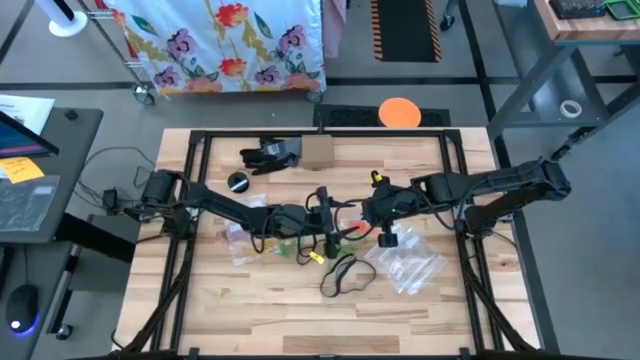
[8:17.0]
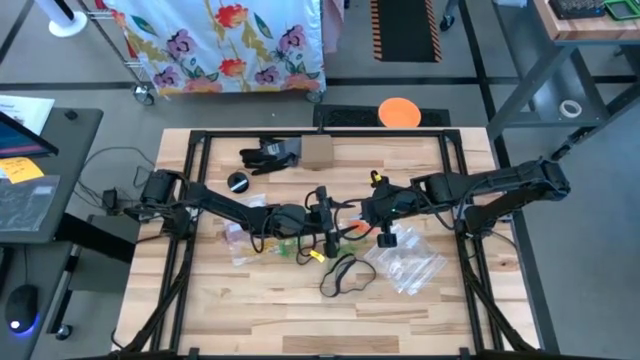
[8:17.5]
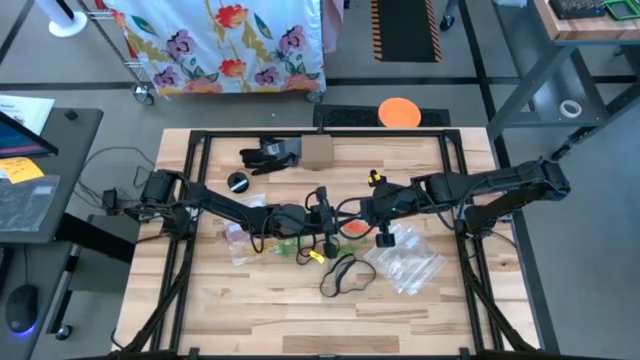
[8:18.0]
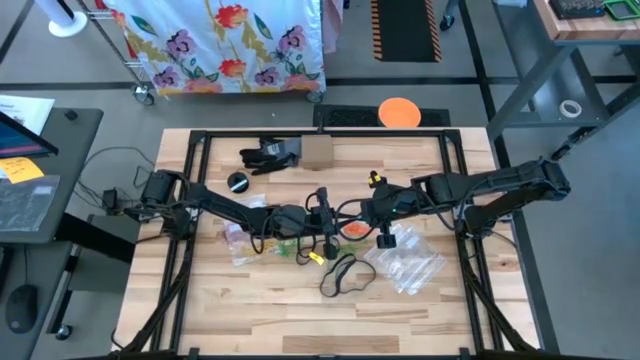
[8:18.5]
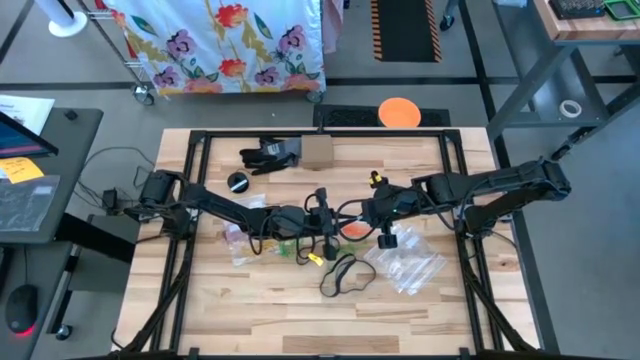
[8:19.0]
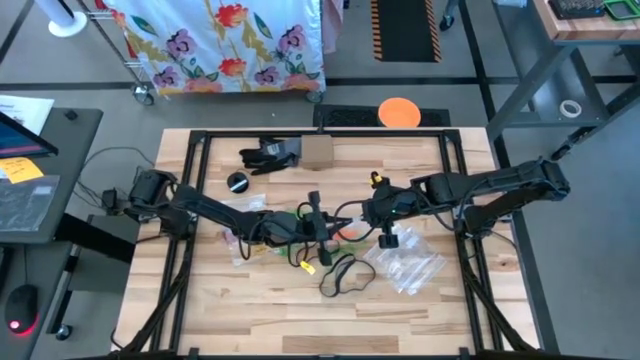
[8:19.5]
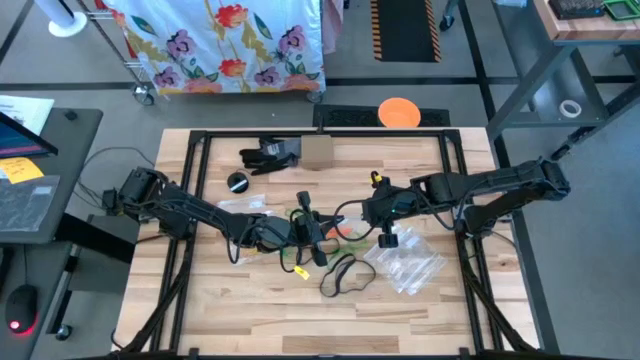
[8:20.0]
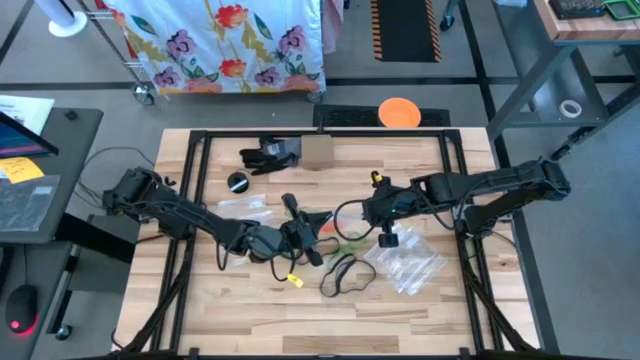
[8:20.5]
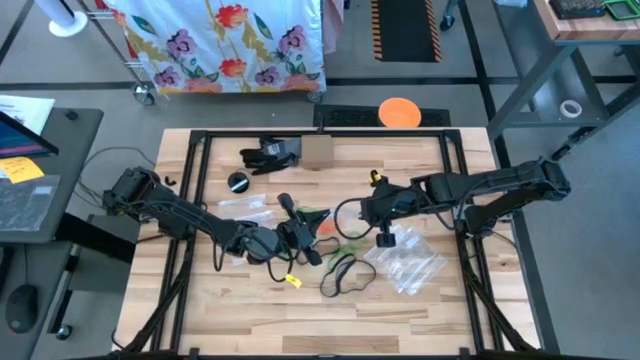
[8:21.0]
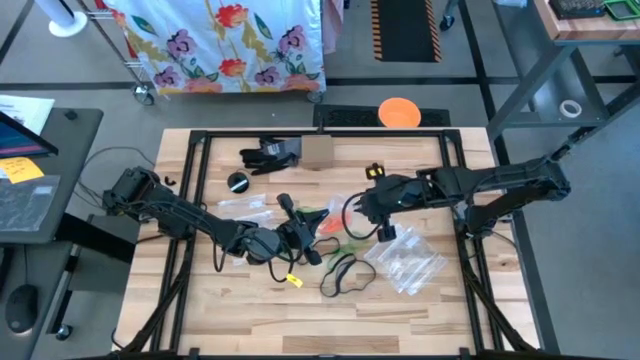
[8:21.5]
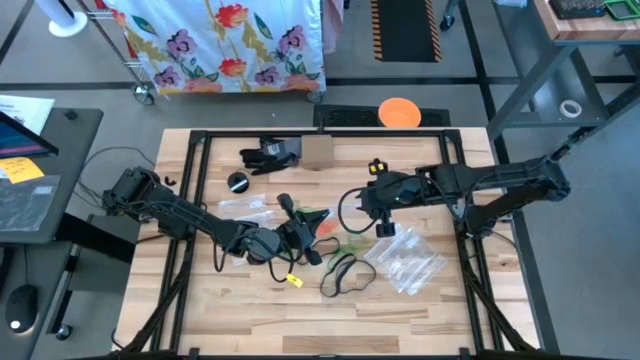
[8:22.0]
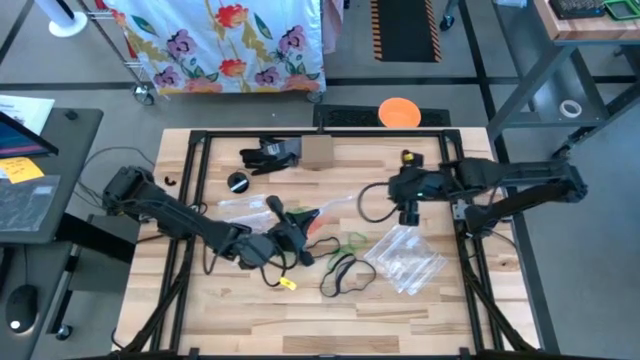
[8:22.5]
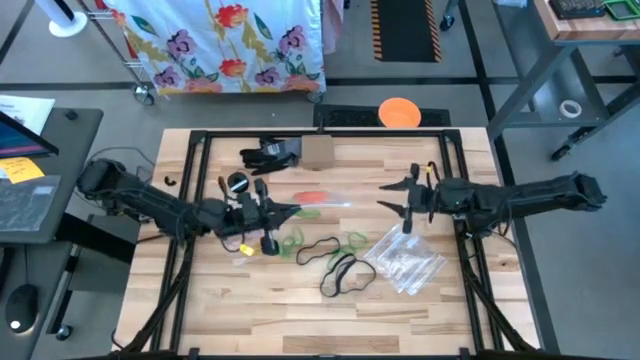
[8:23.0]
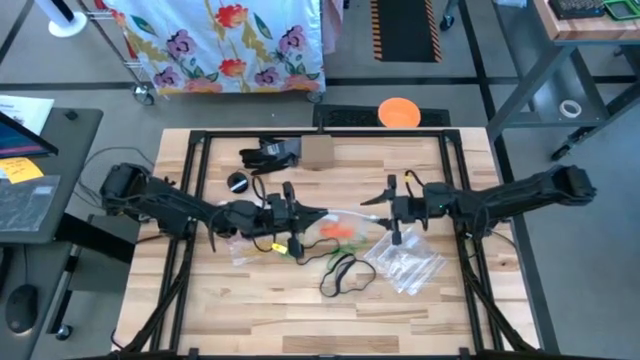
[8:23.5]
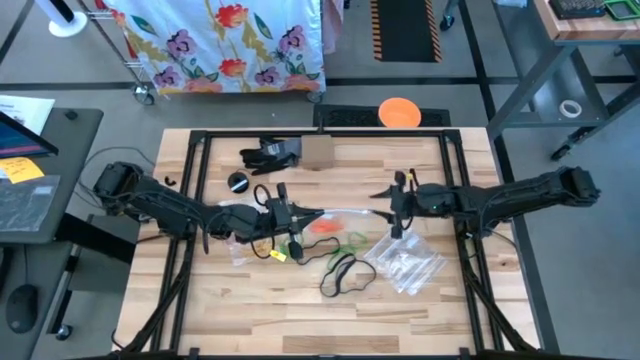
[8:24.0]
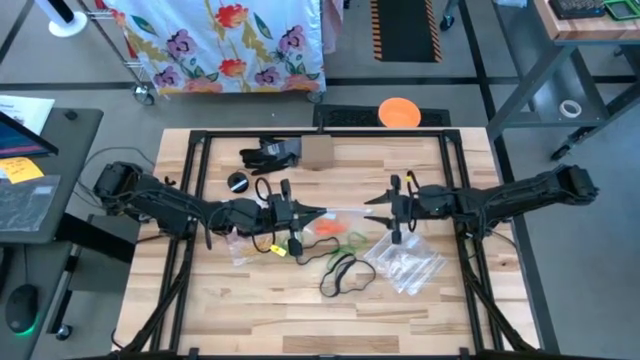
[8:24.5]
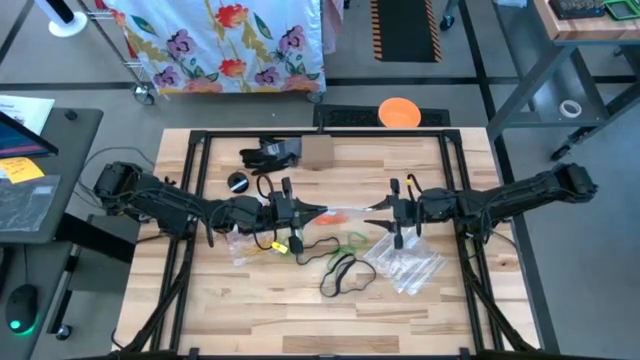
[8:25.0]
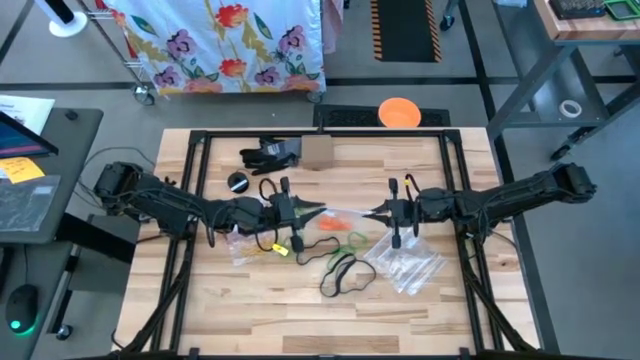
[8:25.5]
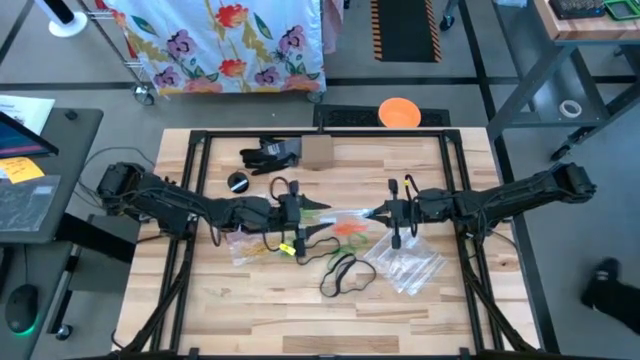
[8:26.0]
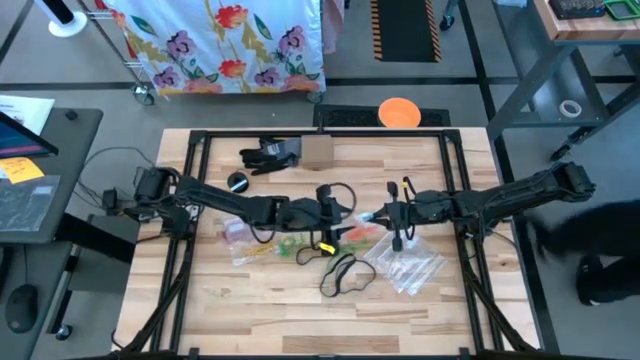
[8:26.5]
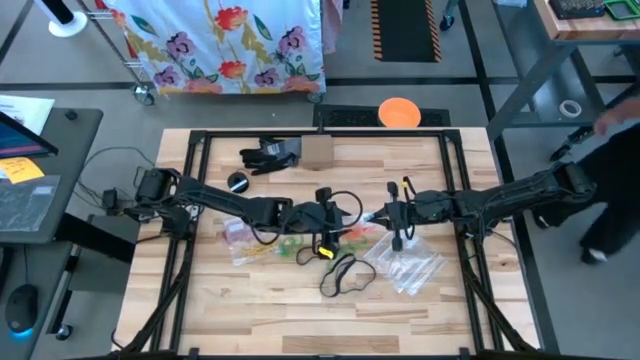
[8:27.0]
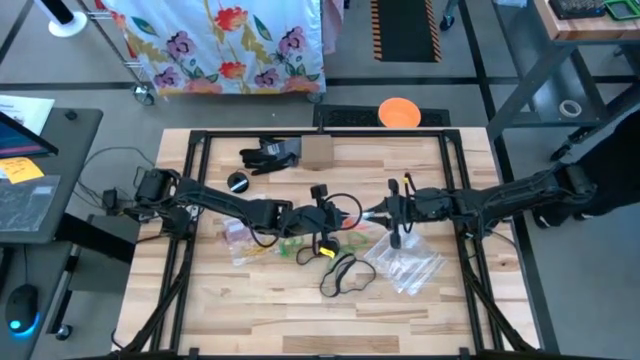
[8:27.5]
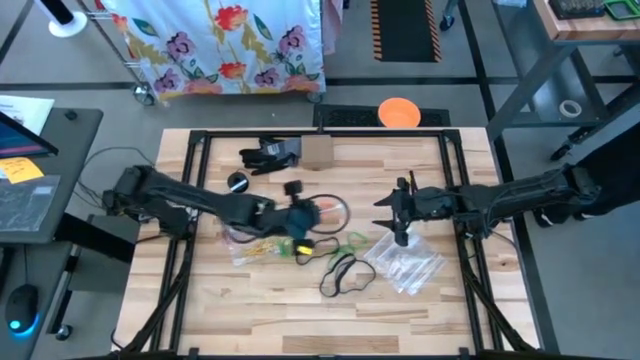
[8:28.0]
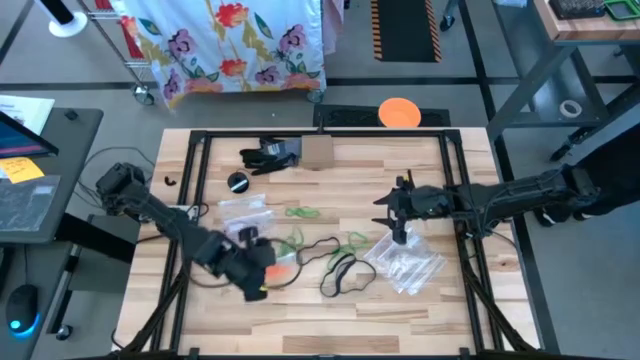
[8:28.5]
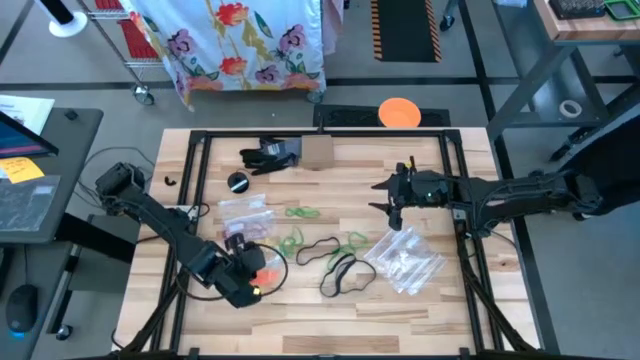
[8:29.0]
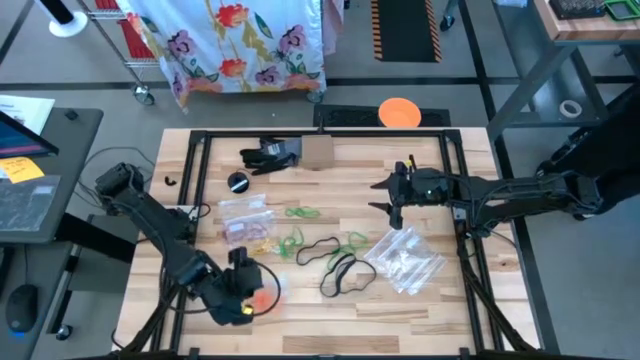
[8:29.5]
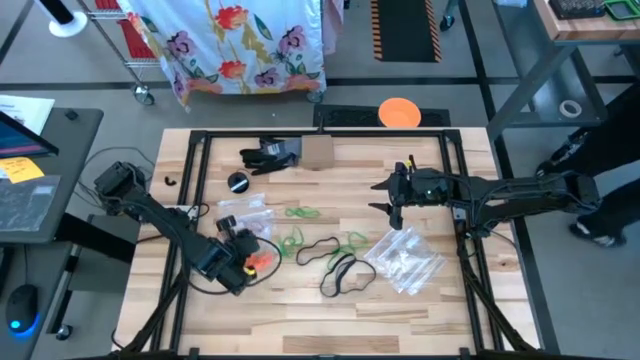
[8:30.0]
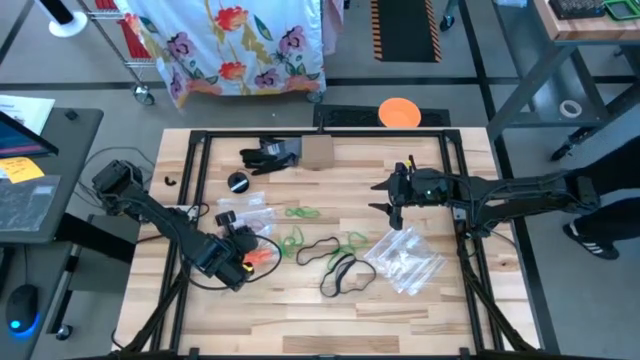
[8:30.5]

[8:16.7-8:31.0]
Task: Sort rubber bands
Close the transparent zip bag

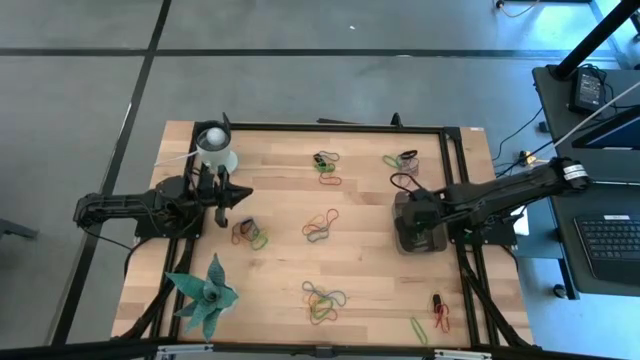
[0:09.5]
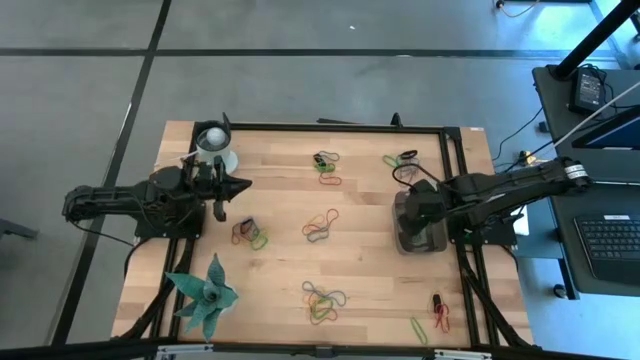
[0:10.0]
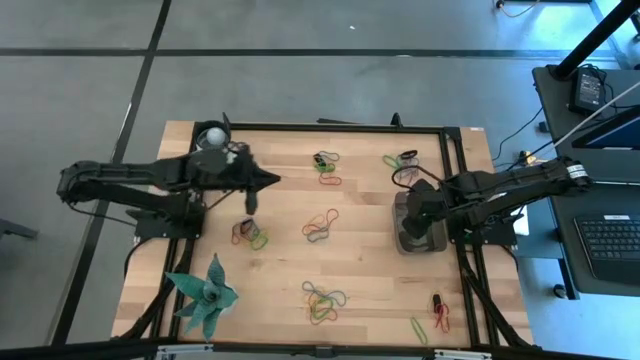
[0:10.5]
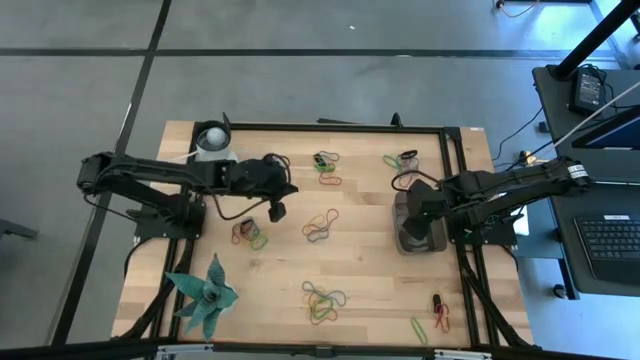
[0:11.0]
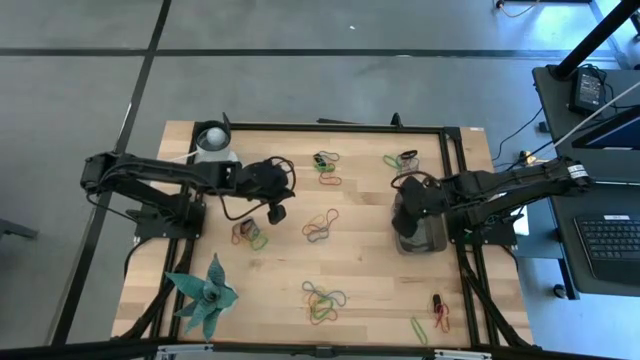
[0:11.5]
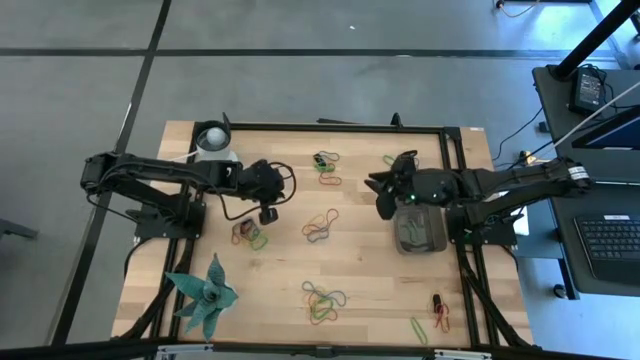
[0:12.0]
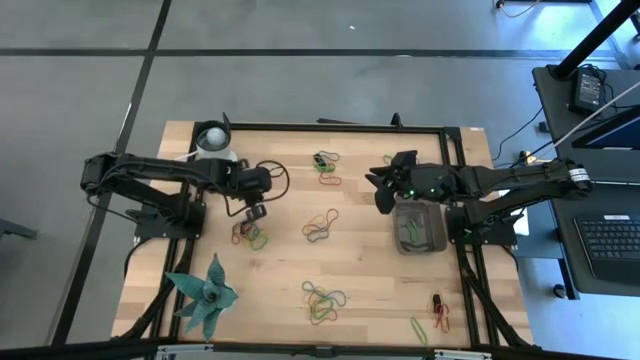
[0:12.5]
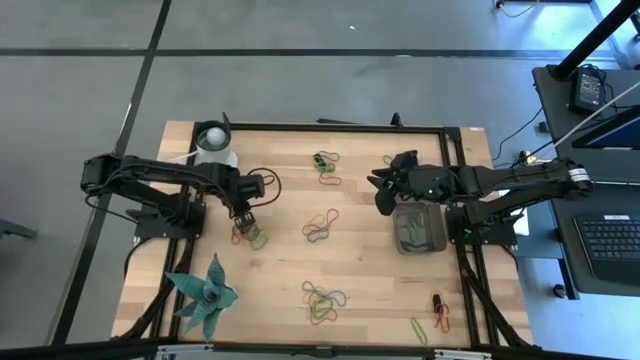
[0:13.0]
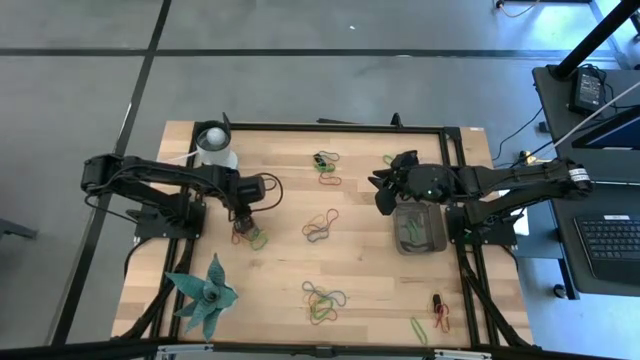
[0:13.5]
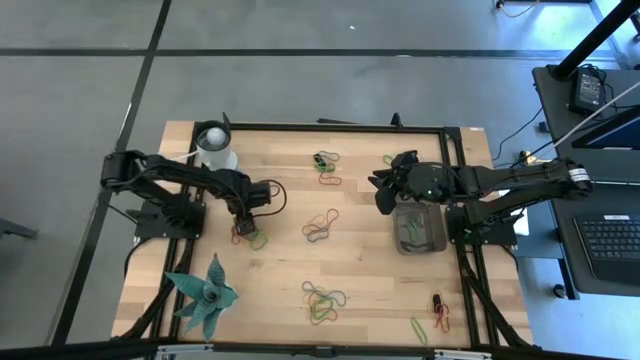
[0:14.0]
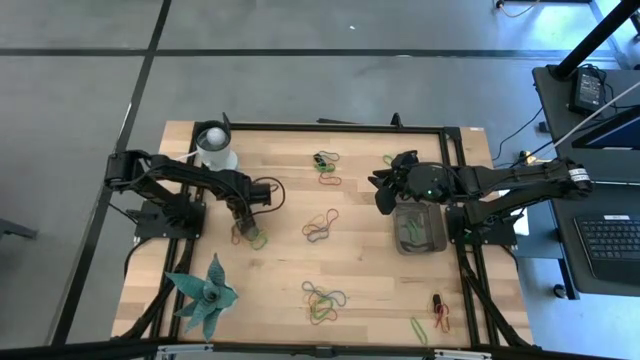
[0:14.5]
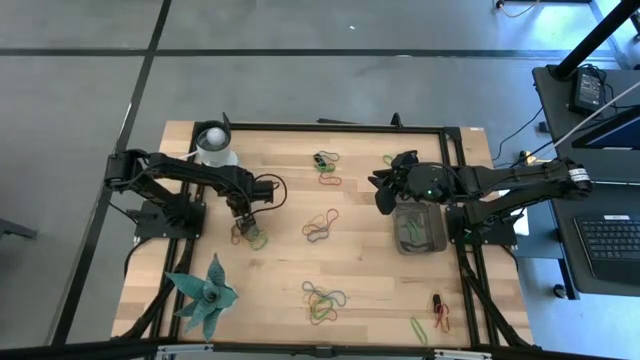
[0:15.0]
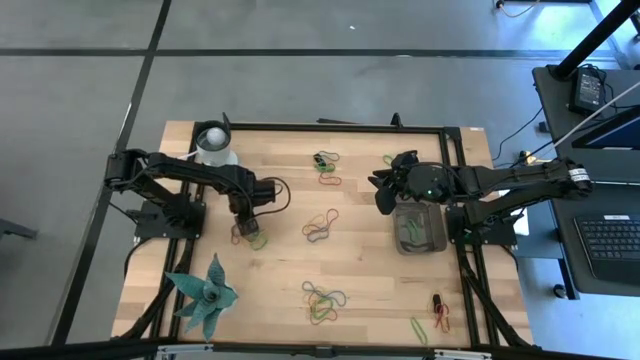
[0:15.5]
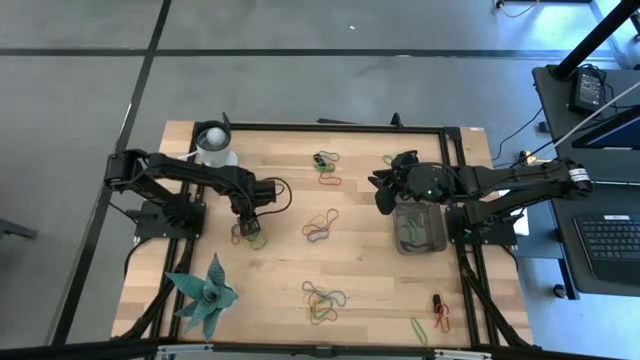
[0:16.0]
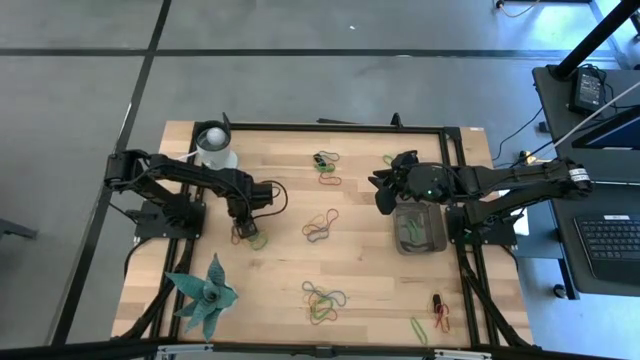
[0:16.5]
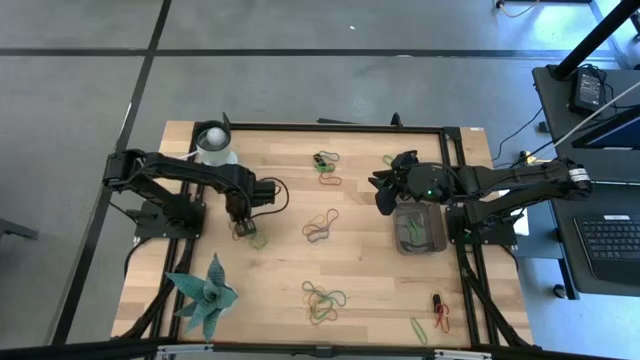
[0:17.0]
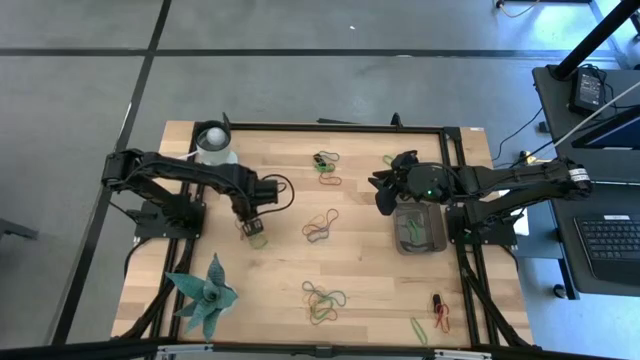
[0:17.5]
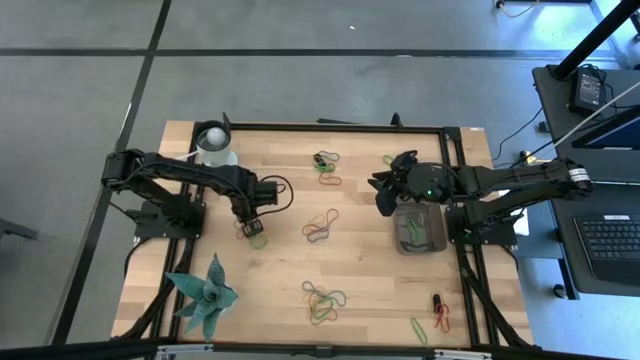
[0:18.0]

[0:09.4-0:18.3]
Task: Pick and place rubber bands into bin
Put the black rubber band into the black bin
